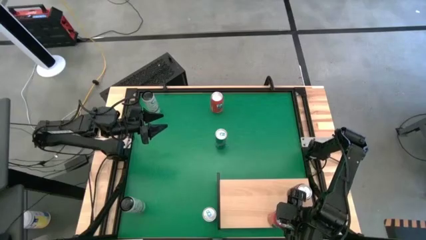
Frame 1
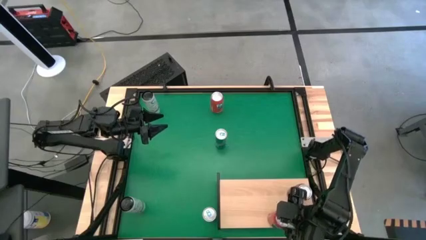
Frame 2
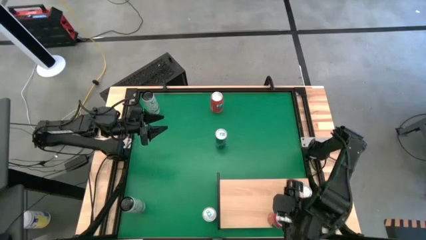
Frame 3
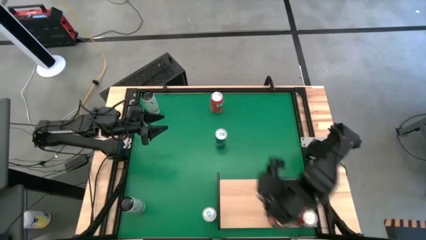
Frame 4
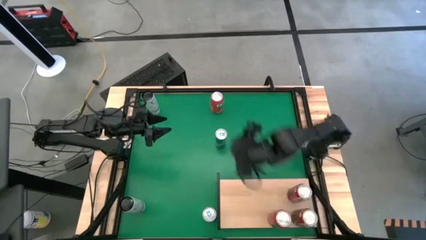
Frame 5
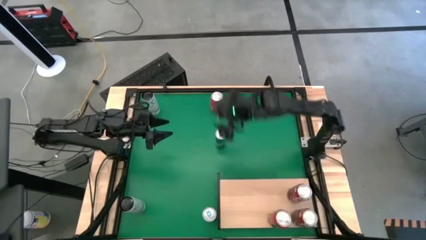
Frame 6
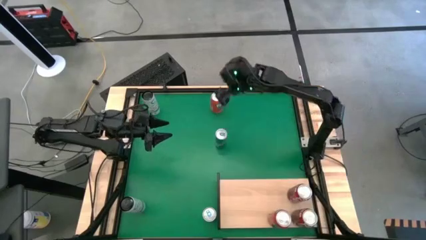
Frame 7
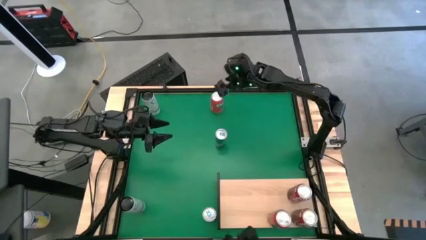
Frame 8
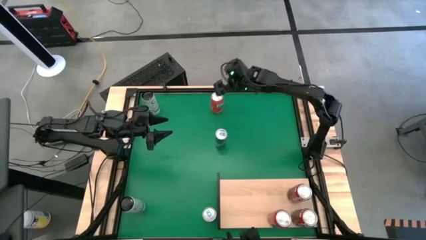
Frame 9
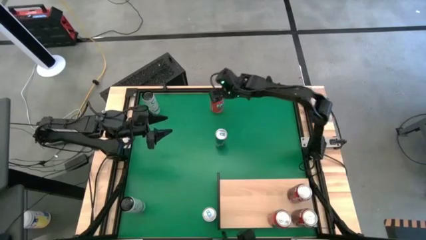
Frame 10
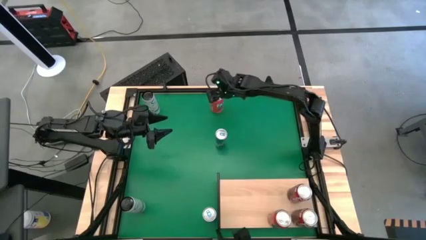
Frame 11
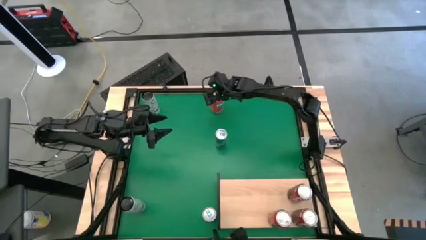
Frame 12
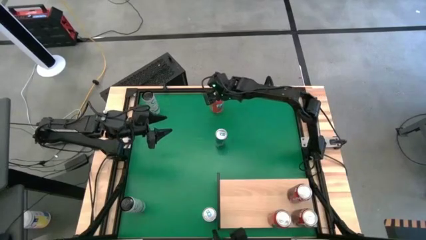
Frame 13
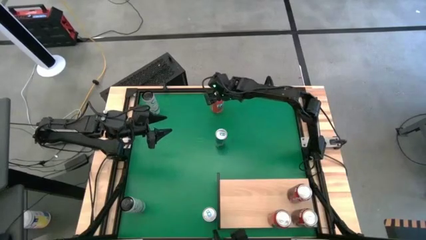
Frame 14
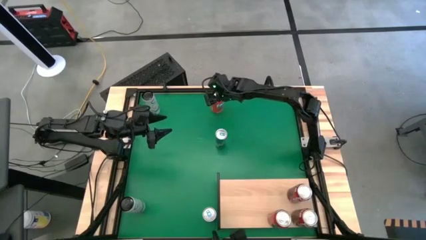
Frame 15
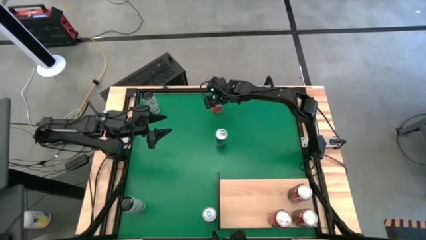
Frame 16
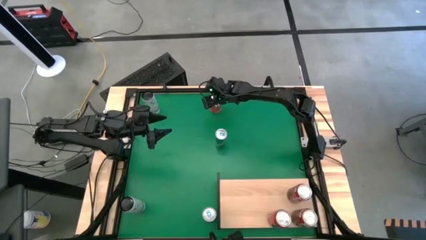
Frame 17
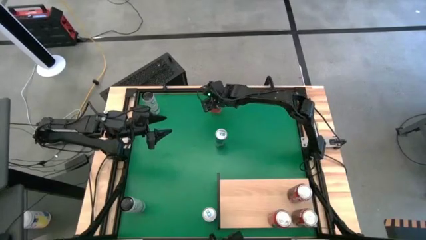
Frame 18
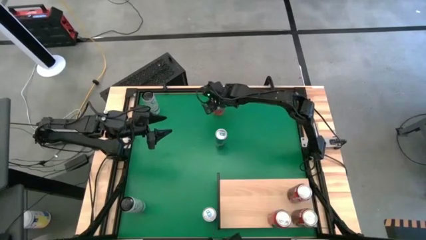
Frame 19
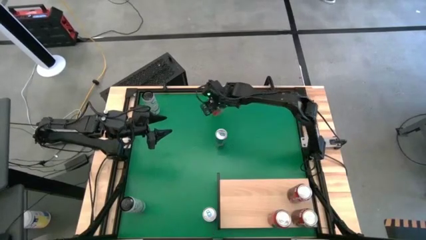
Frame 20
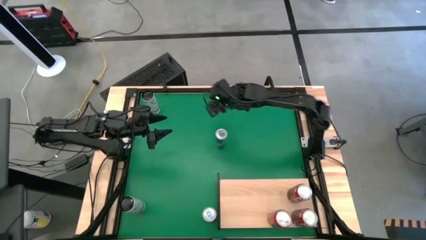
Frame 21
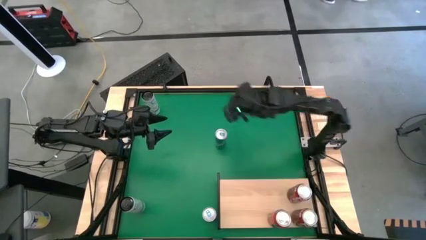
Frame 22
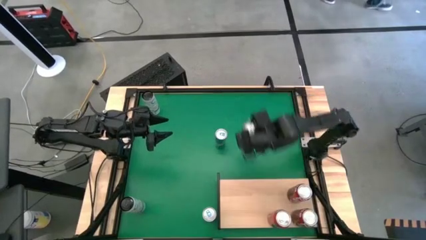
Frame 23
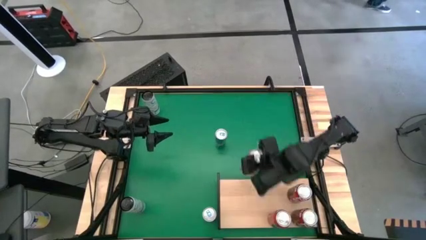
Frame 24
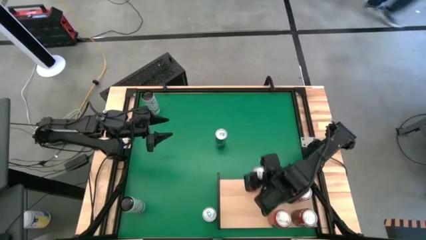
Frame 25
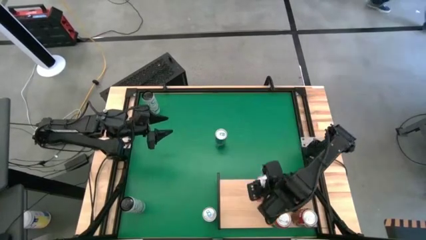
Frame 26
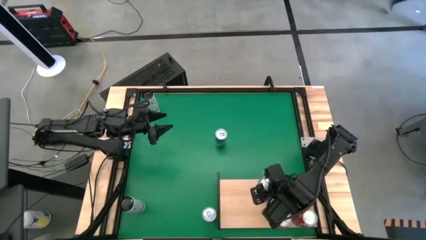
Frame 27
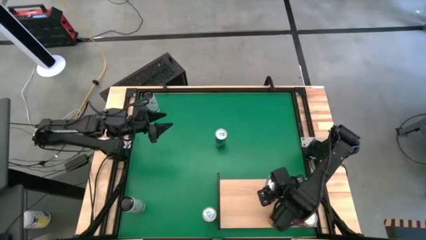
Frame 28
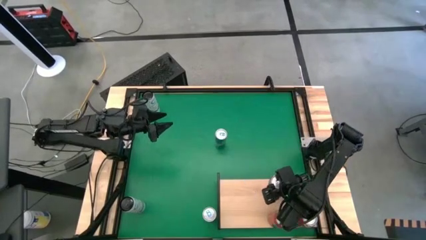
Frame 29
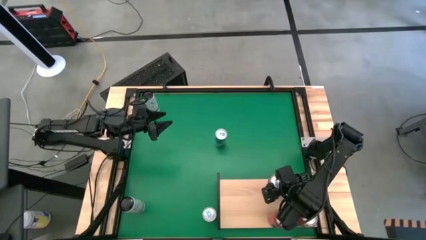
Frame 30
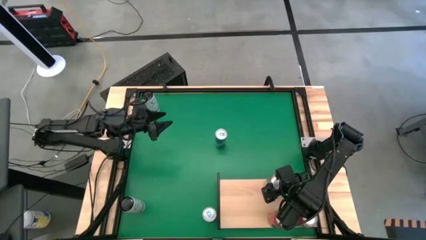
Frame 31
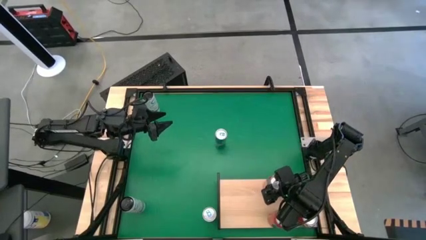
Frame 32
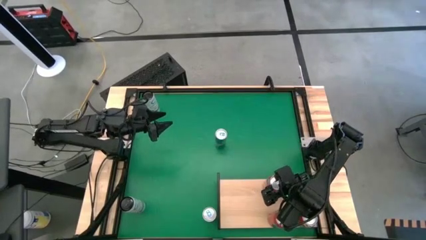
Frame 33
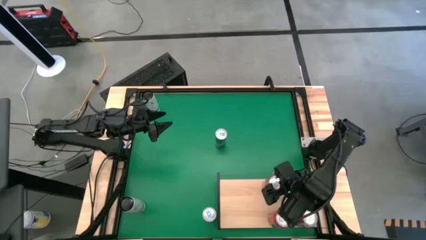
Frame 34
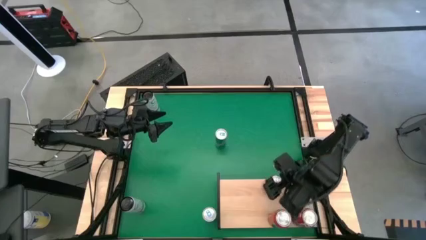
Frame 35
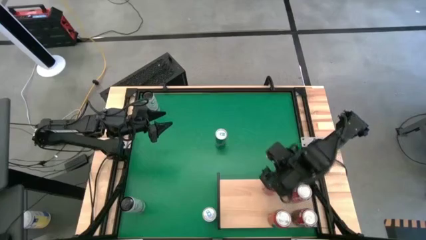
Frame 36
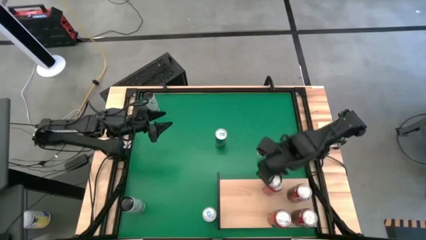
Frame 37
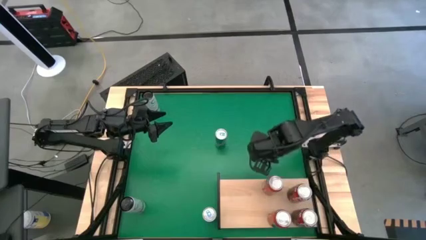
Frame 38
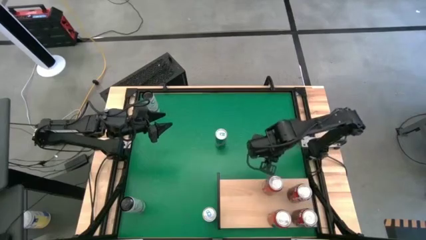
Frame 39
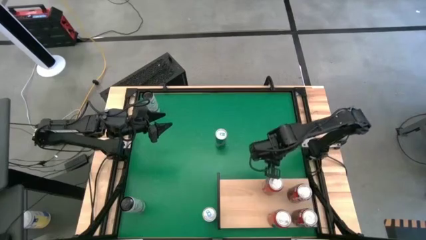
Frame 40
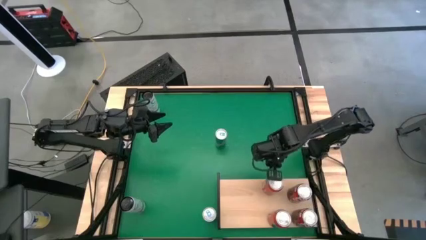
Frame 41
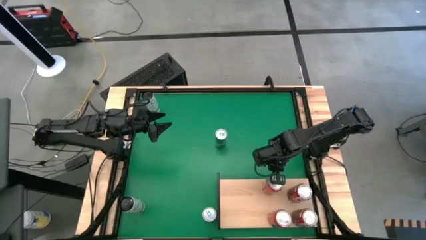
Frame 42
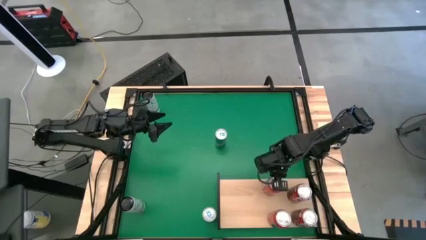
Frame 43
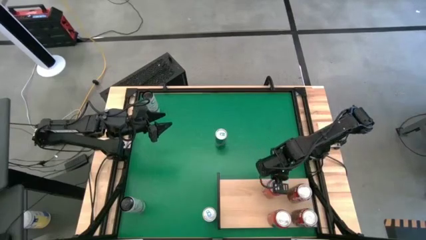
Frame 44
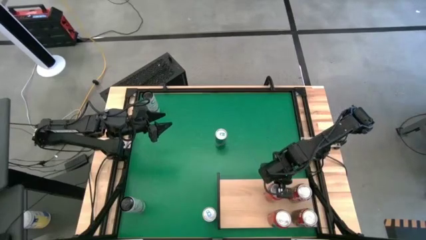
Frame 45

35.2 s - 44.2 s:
Task: Place canned beverage on shelf
Put the red soda can on the shelf aligned with the other red soda can on the shelf

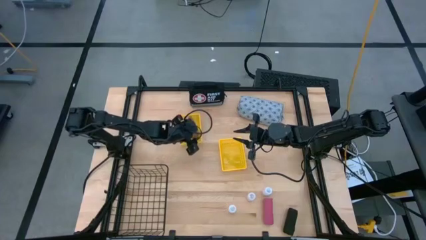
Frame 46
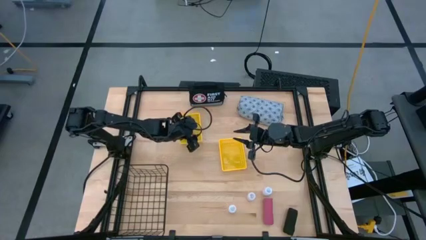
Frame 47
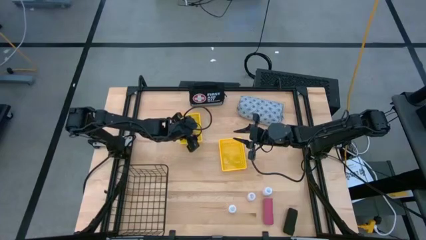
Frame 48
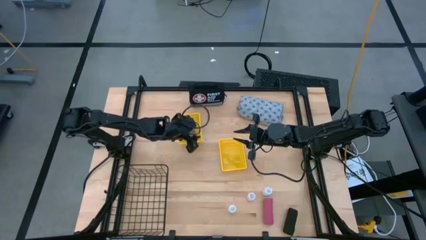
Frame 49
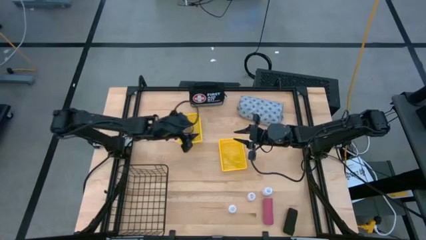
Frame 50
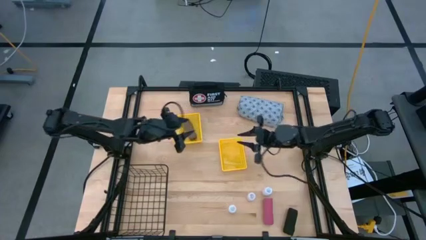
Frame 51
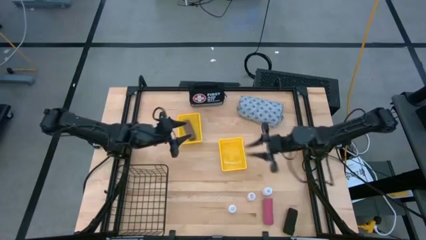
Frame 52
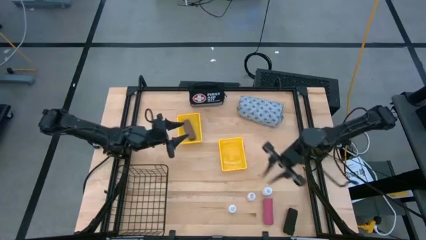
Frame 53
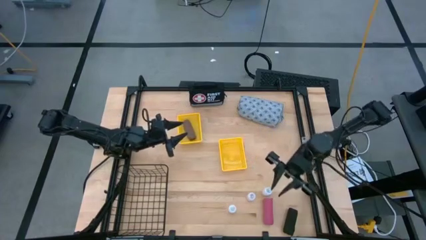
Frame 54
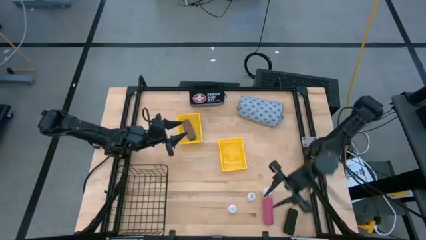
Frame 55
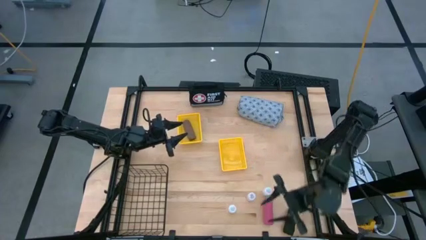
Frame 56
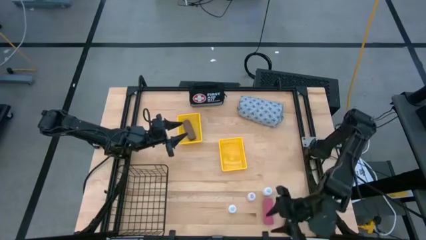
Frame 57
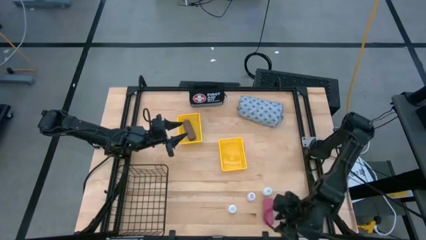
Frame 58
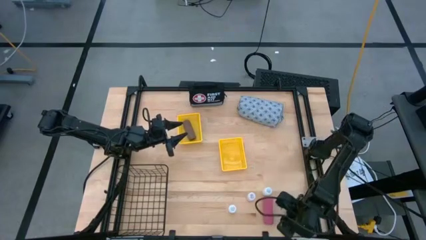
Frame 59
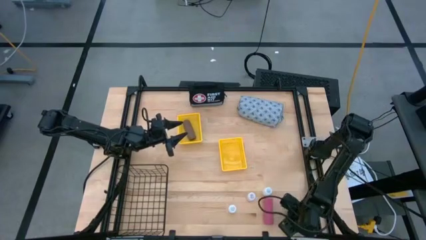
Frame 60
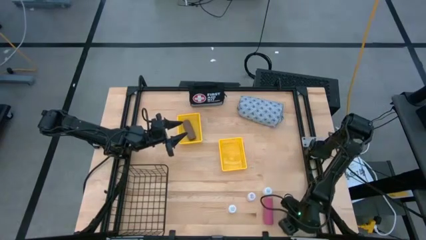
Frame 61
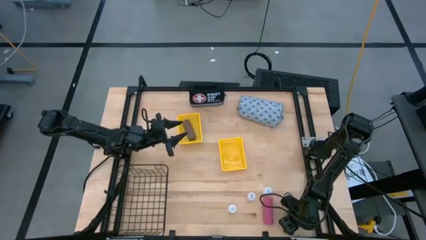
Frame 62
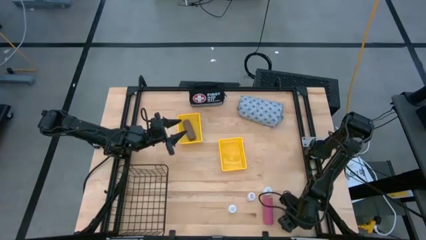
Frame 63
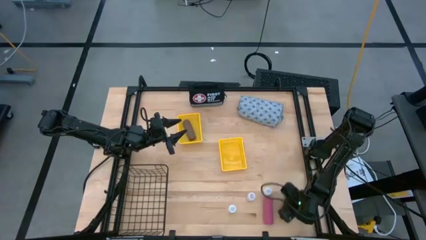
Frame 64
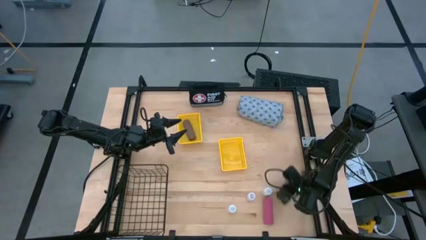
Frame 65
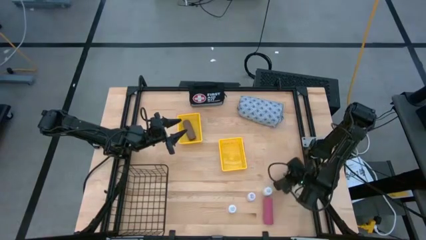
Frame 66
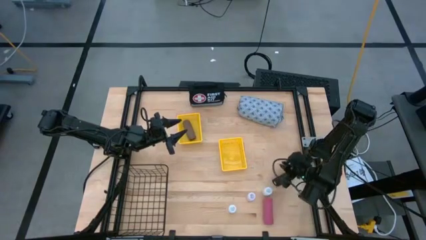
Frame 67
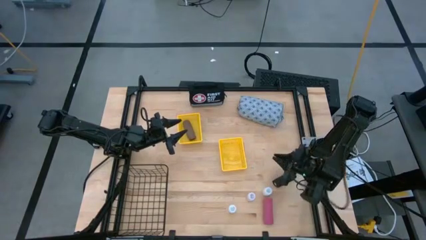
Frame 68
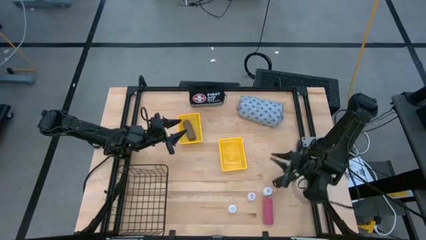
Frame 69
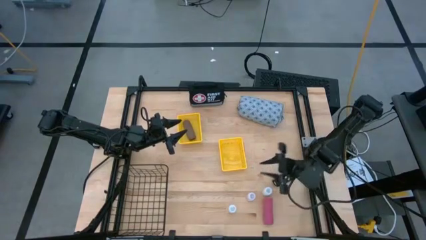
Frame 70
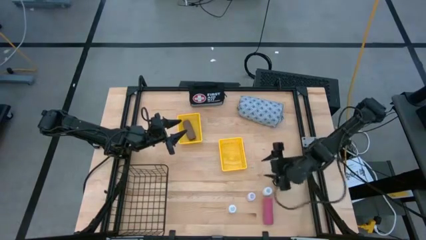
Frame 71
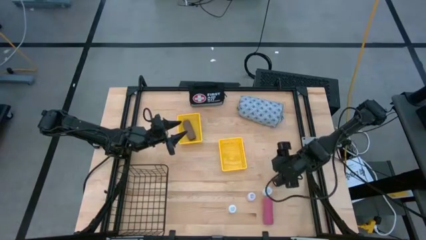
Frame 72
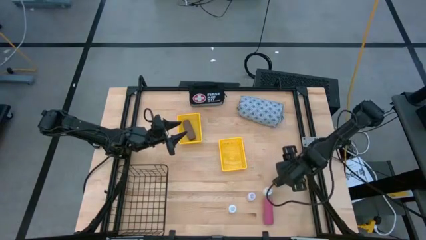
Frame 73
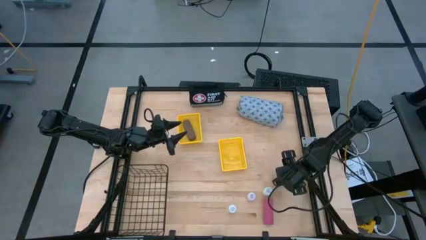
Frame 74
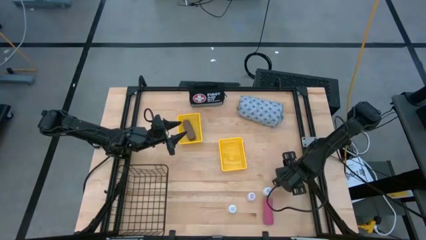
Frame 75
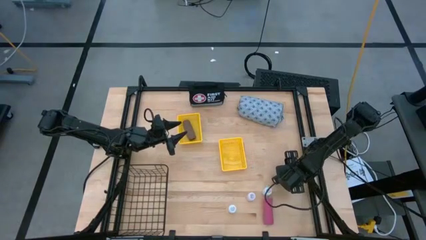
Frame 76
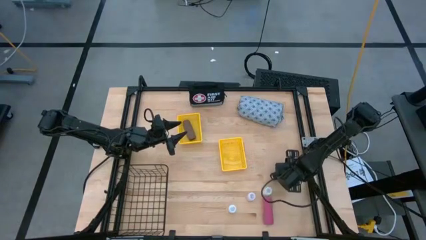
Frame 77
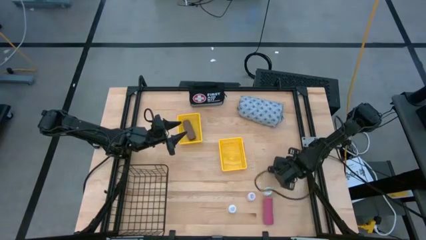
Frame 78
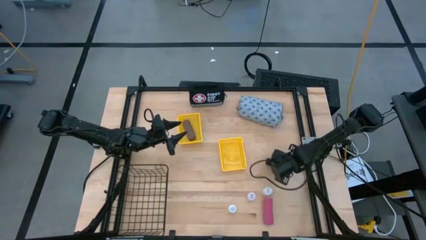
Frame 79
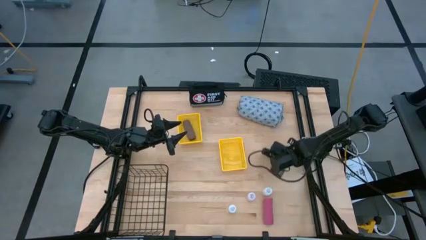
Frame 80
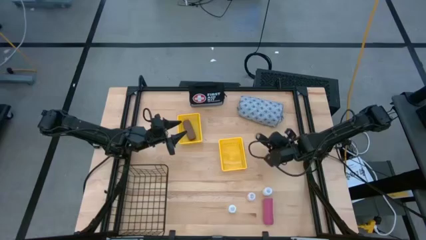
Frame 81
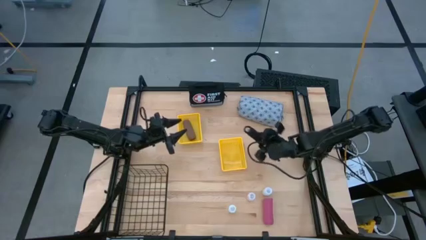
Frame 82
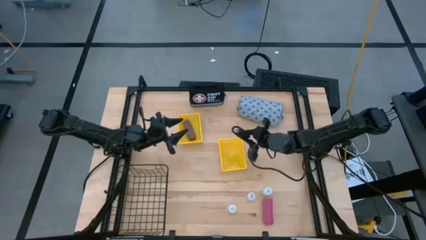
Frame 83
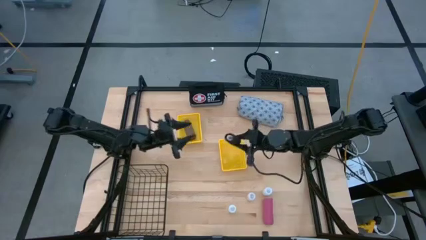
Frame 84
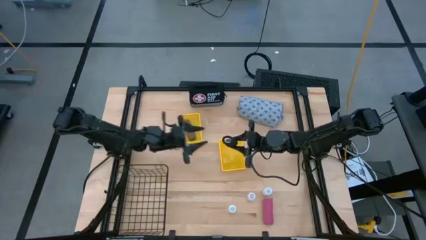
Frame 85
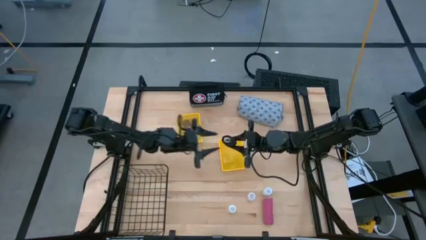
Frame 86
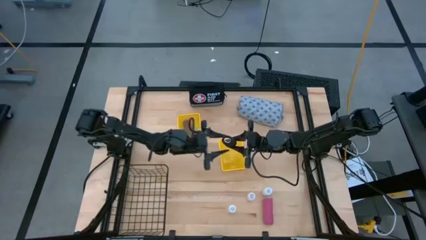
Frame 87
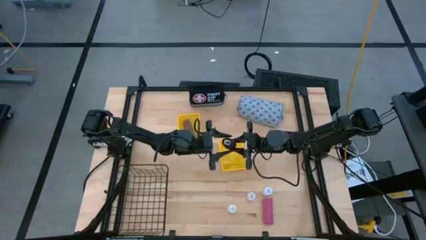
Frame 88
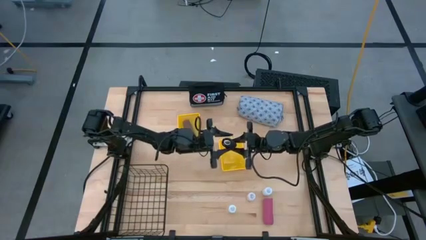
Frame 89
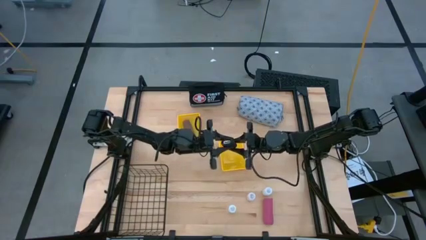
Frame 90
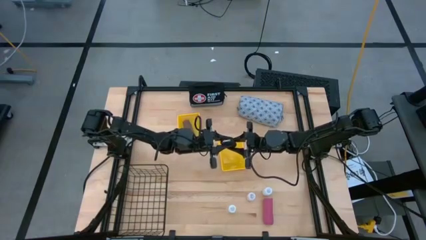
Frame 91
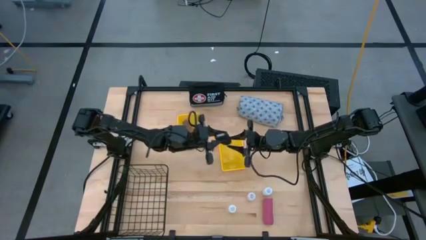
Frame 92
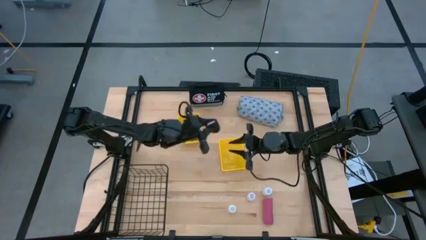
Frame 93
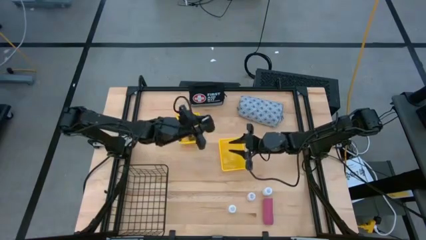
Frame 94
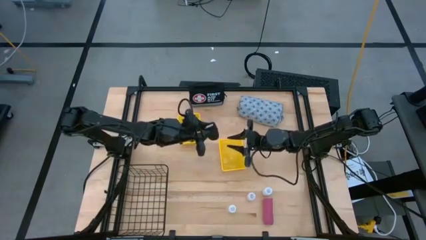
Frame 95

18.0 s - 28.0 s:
Task: Pick & Place Medicine items
Put the black bandage into the left yellow basket
